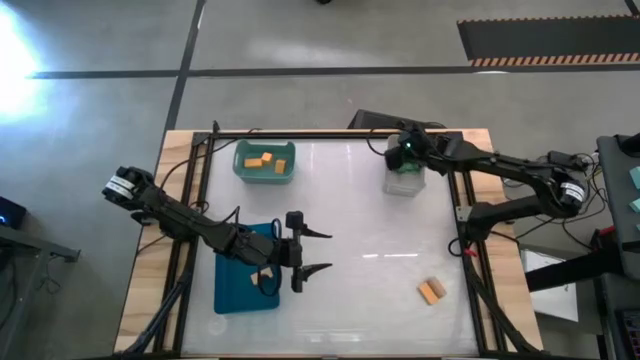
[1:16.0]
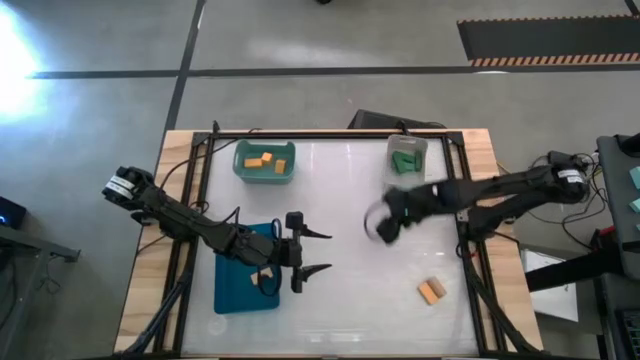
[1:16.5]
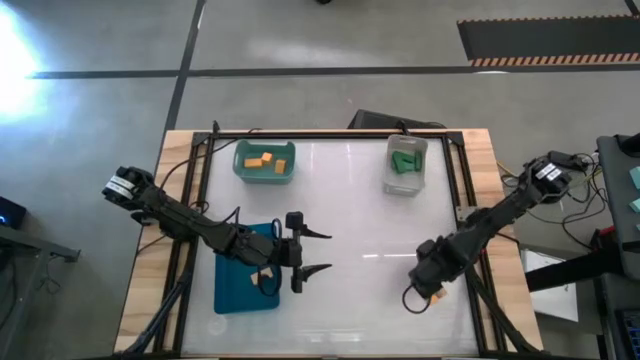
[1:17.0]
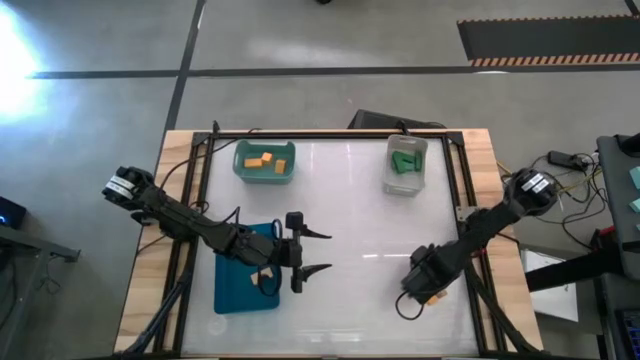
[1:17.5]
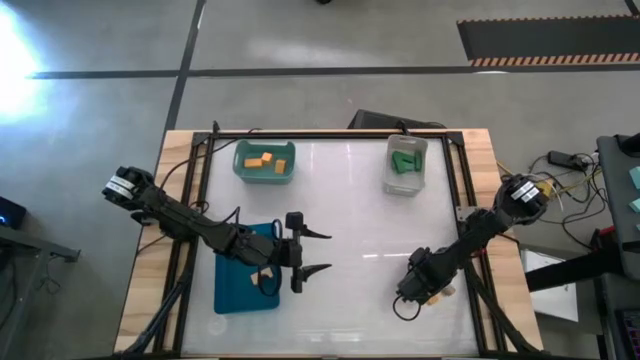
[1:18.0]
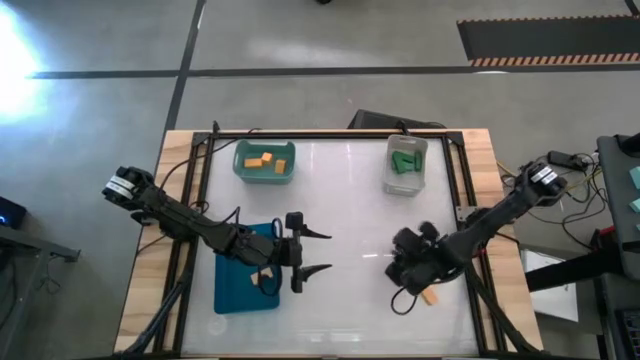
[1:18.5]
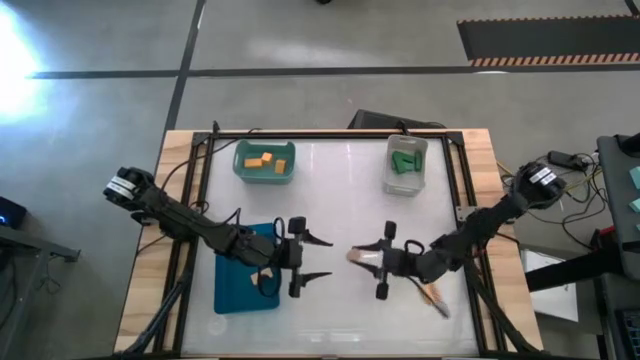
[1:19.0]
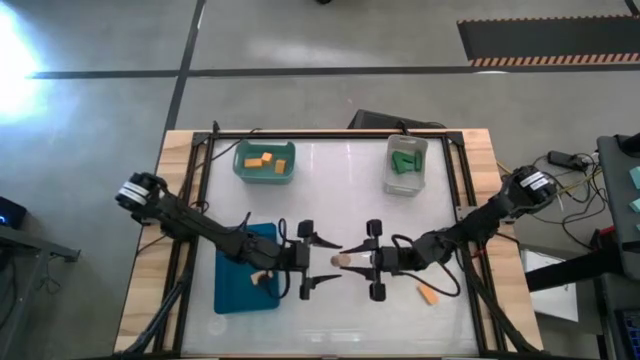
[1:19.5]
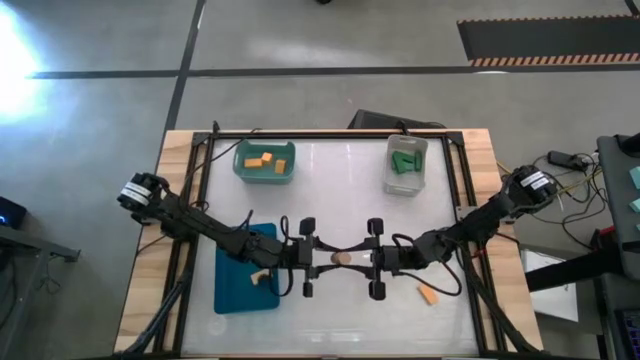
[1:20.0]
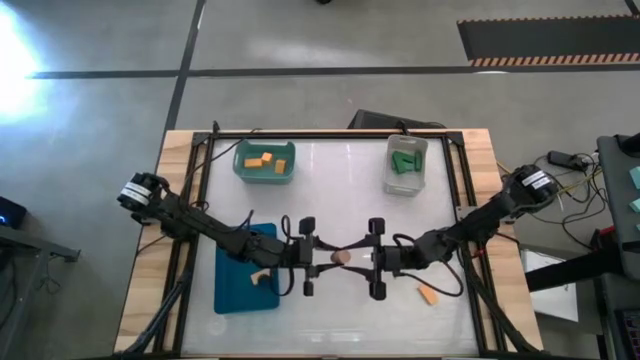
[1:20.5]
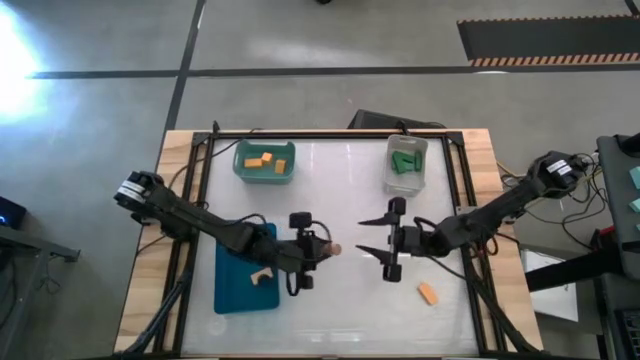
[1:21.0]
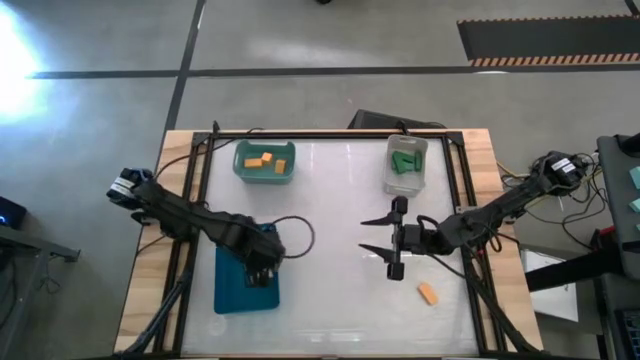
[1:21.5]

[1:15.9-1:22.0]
Task: Sort & place blocks by color
Put the light brown block into the blue bin

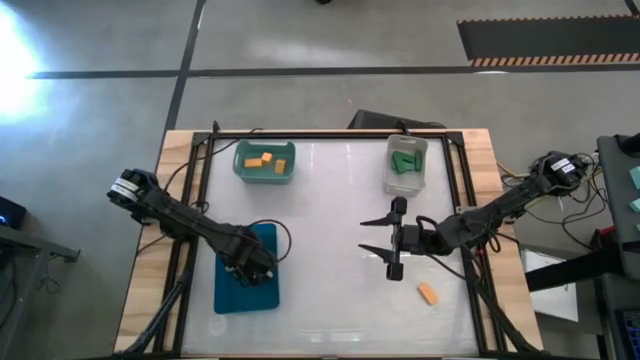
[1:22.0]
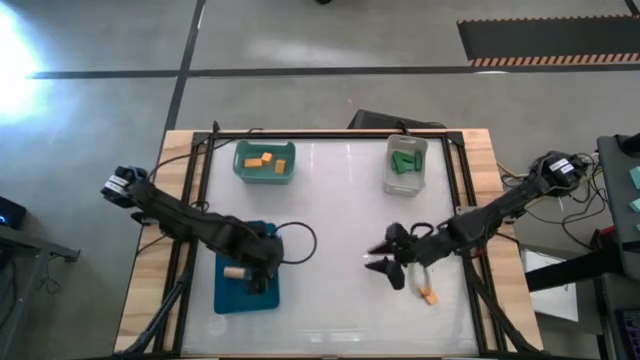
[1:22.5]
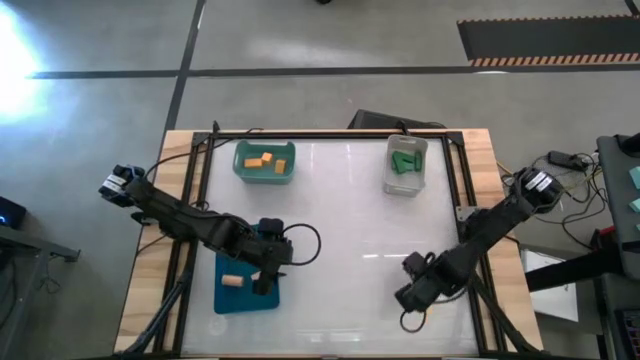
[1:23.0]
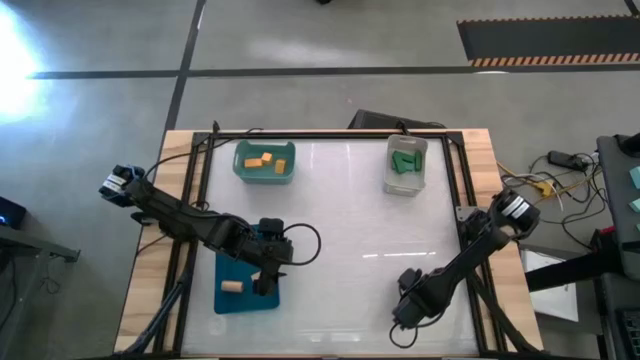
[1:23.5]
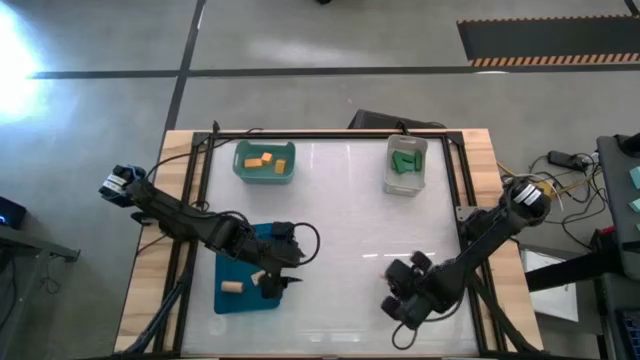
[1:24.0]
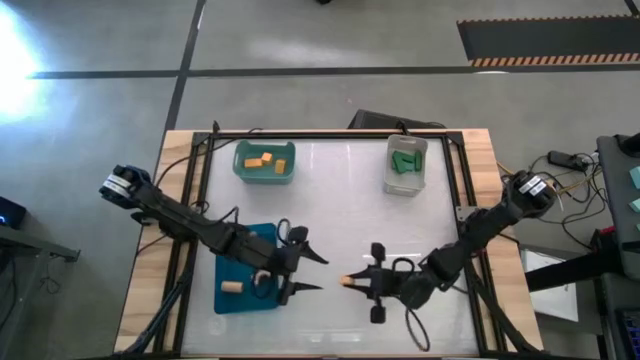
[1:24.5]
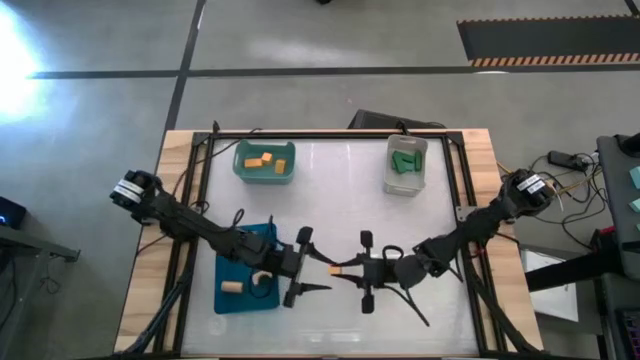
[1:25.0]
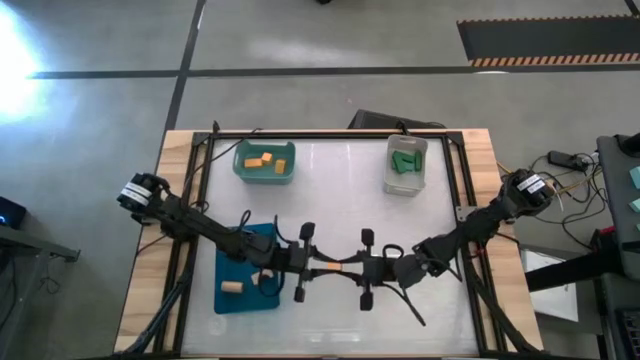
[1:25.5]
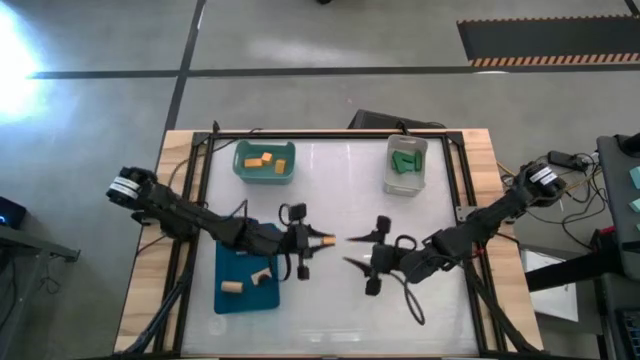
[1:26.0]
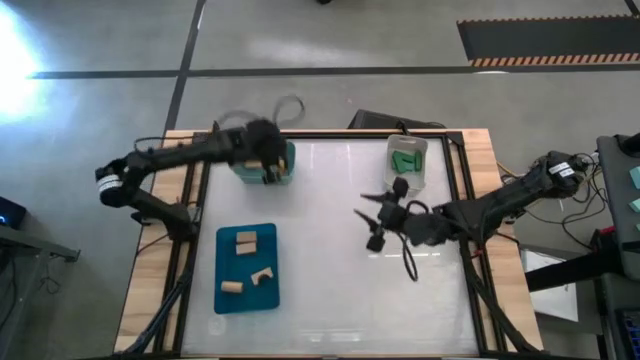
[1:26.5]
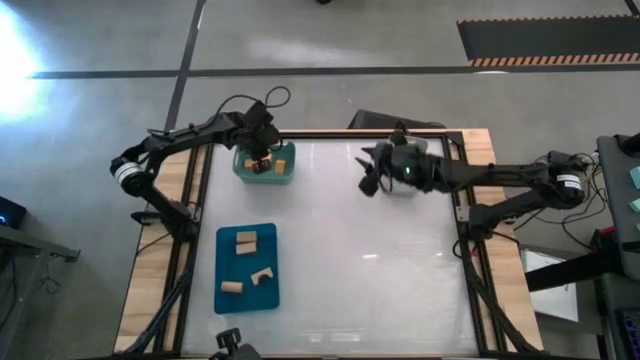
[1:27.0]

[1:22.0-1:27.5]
Put the yellow block into the green bin

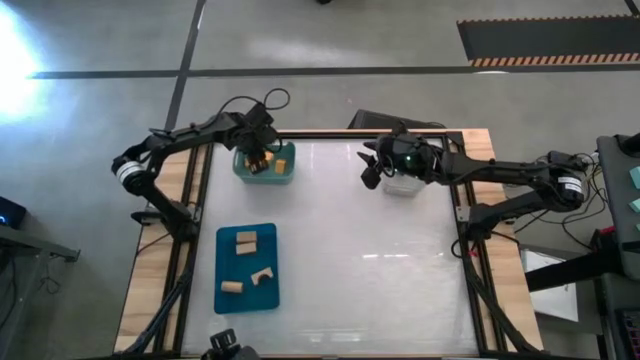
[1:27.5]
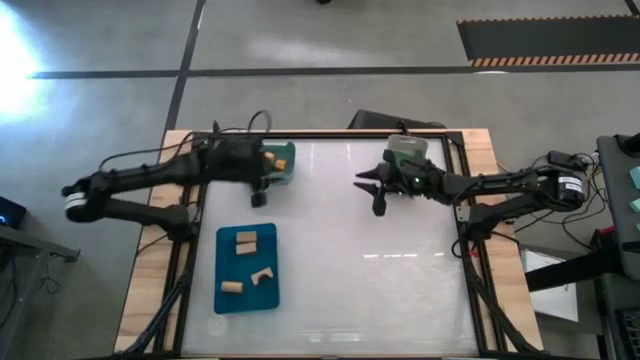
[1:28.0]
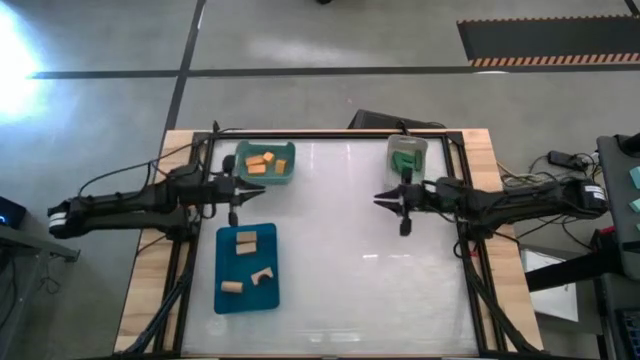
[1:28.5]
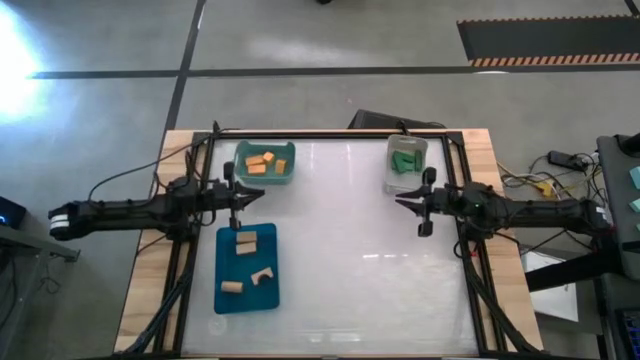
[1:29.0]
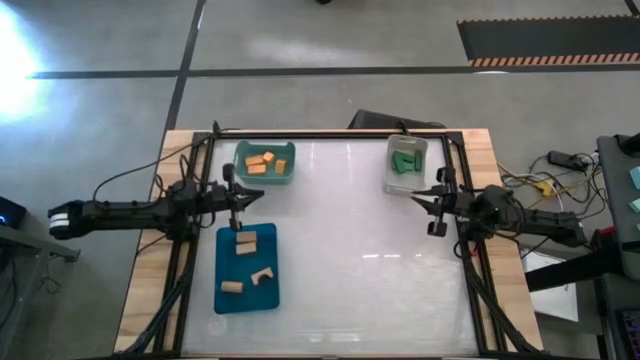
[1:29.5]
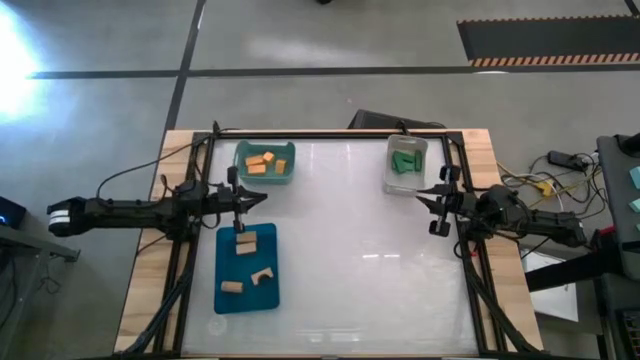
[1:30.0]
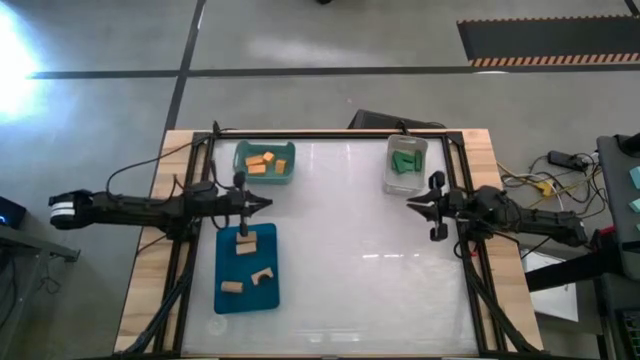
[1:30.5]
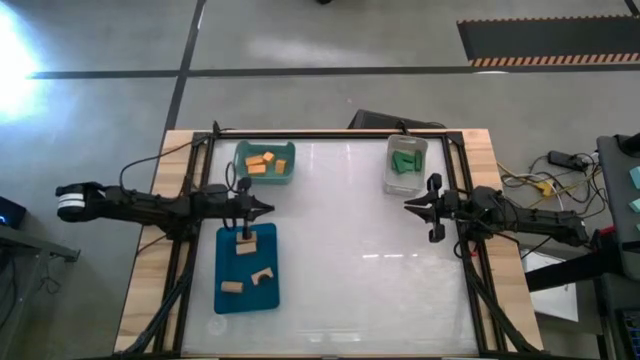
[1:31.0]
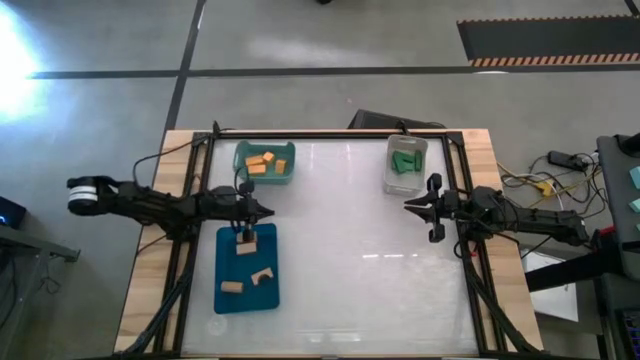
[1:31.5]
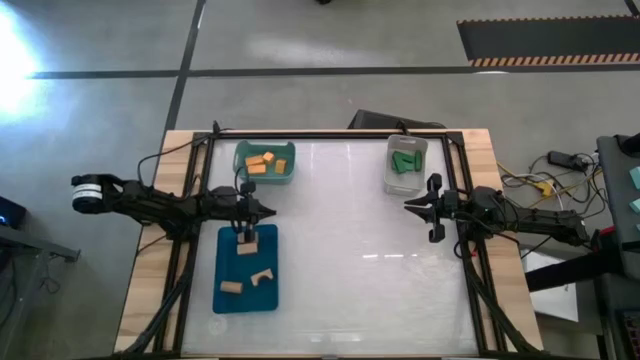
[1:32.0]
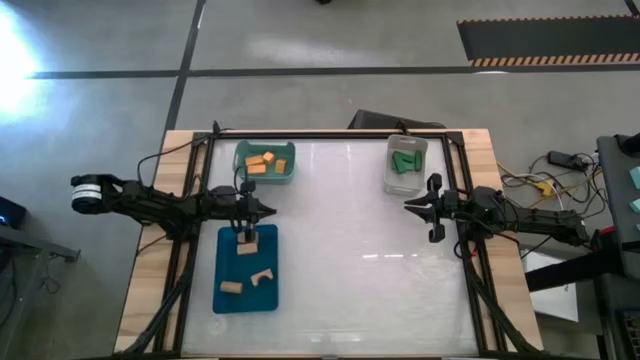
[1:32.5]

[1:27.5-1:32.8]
Return to Home Position

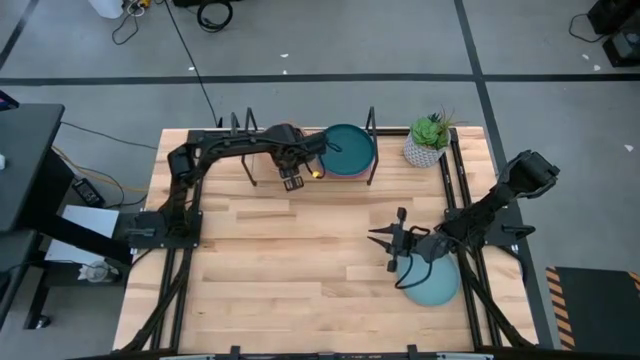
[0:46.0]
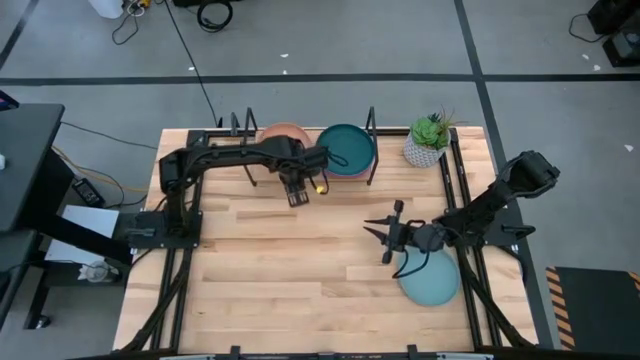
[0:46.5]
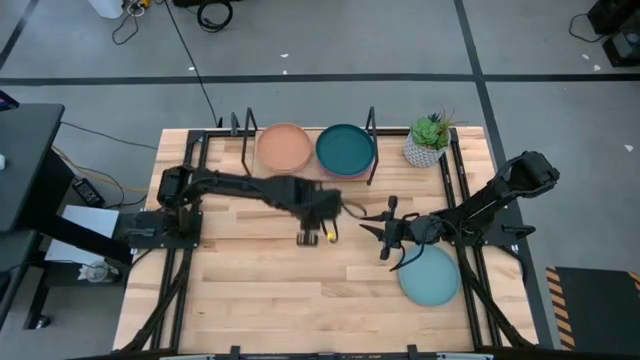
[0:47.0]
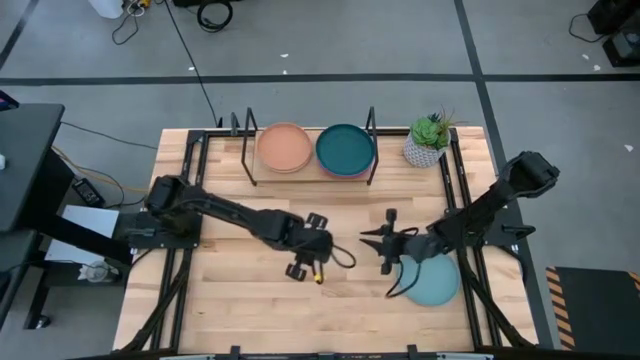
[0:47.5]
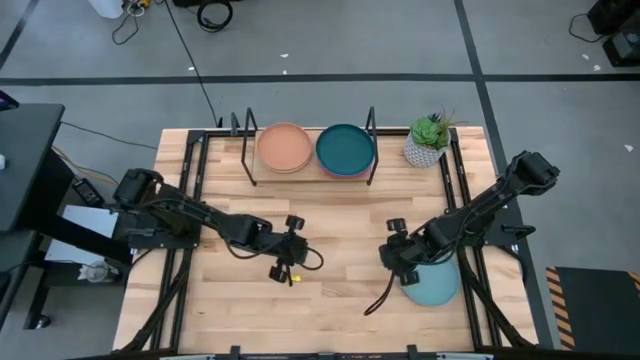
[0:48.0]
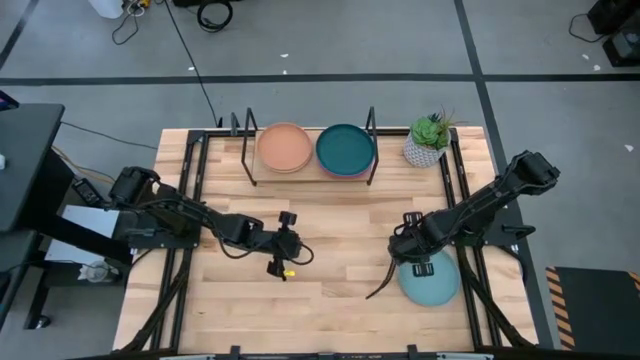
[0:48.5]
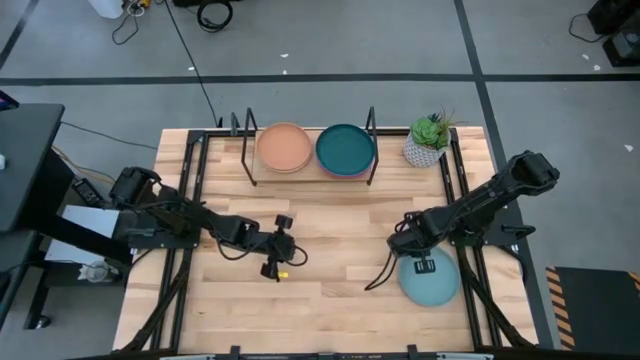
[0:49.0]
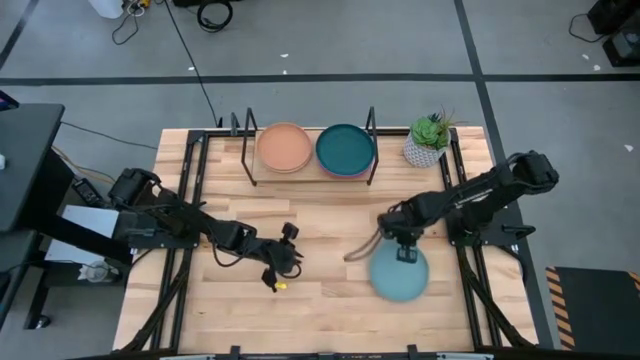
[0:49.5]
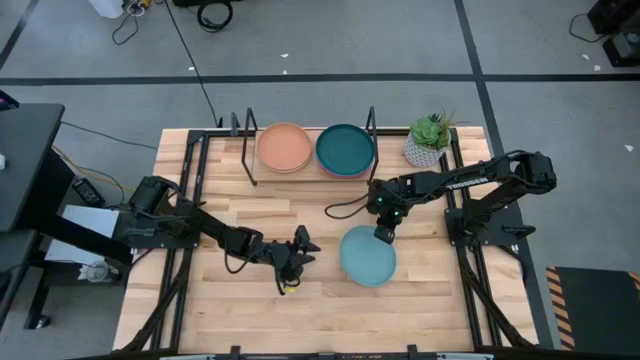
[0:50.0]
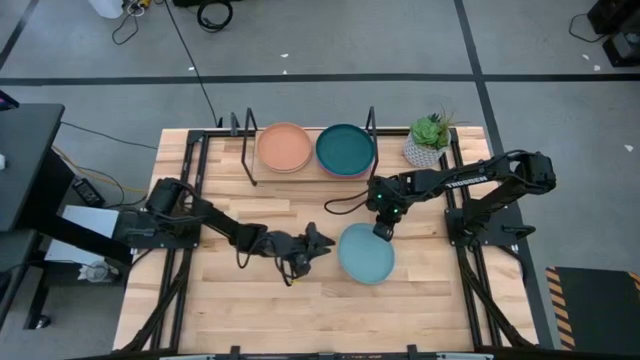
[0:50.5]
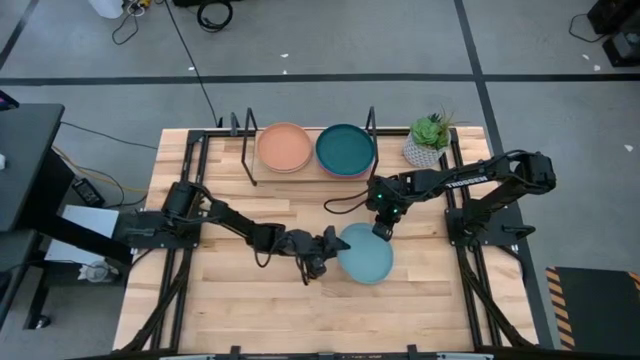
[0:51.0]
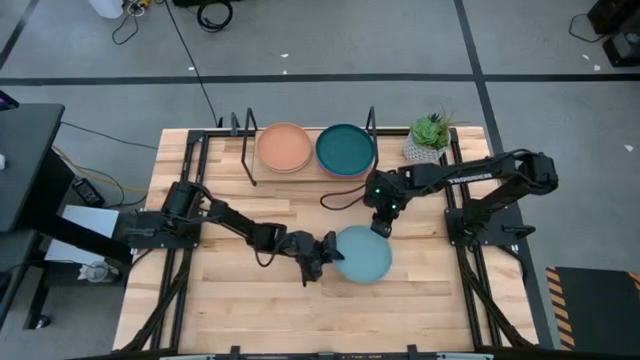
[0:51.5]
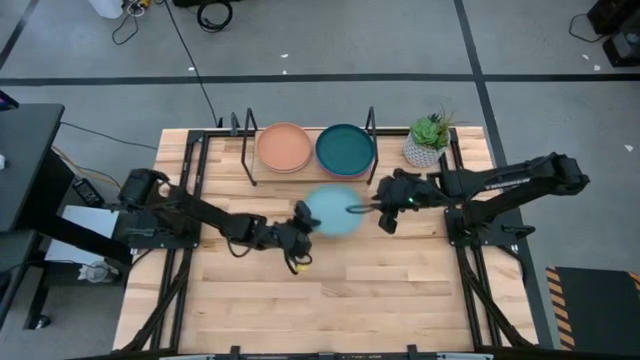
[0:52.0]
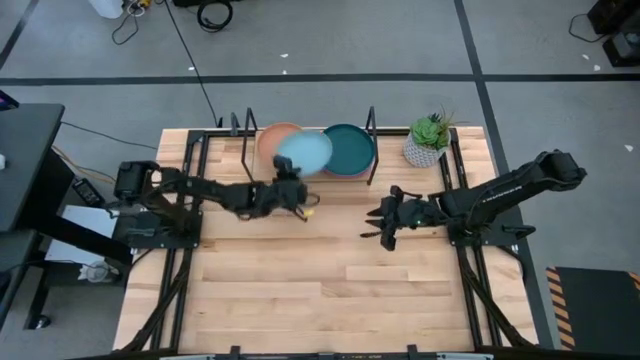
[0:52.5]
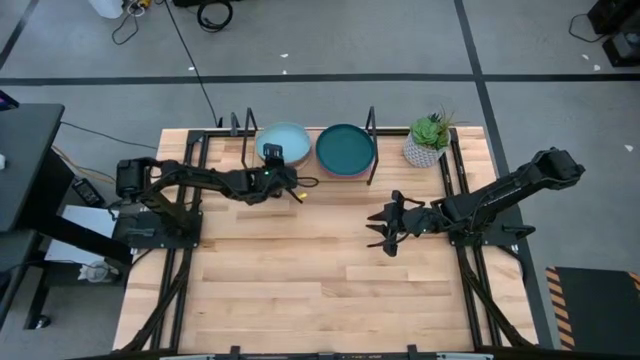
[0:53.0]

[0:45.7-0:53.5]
Task: Place and stack plates onto a shelf
Stack the light blue plate on top of the brown plate on the shelf
